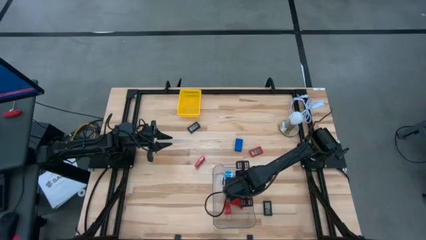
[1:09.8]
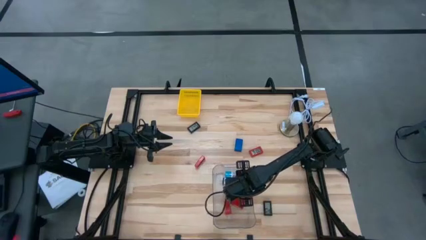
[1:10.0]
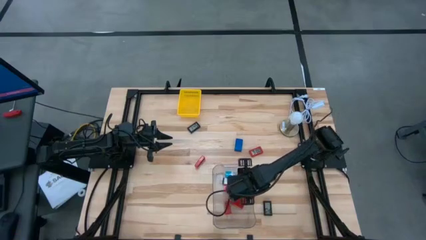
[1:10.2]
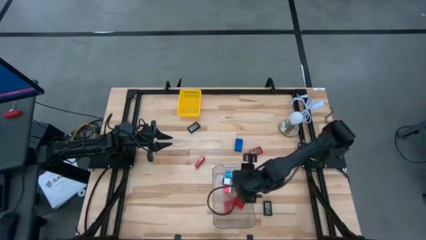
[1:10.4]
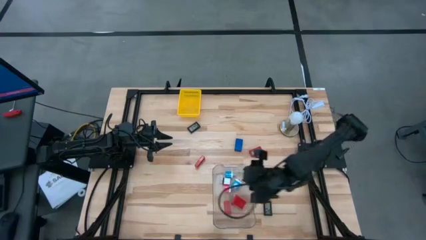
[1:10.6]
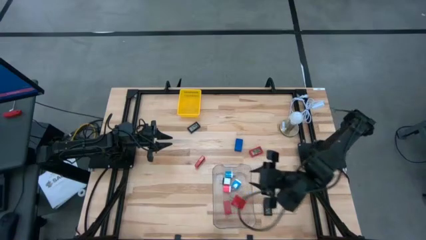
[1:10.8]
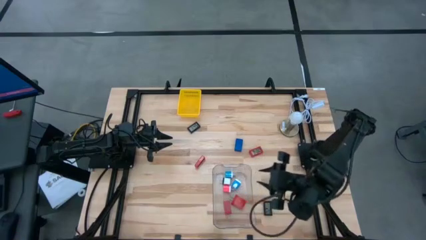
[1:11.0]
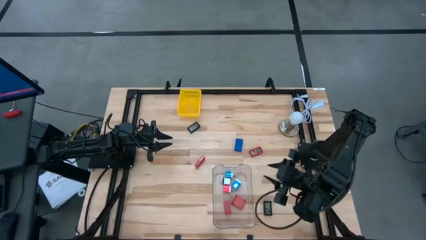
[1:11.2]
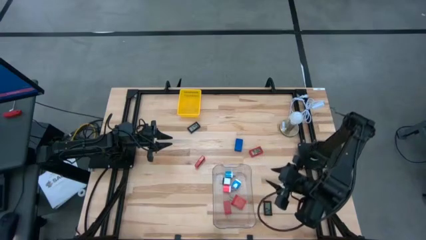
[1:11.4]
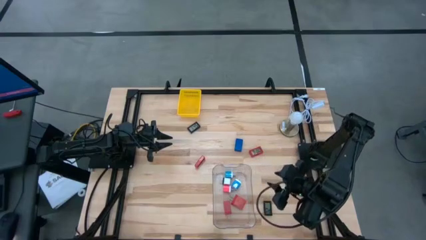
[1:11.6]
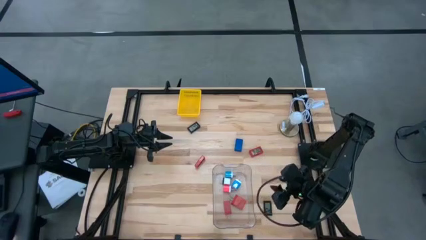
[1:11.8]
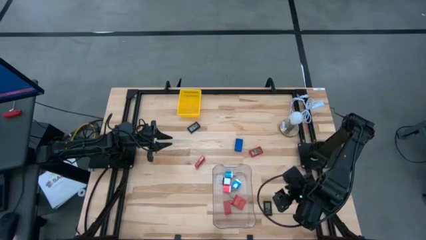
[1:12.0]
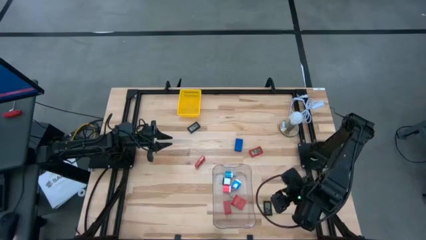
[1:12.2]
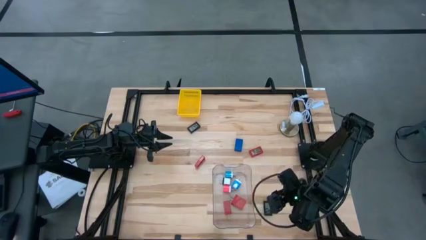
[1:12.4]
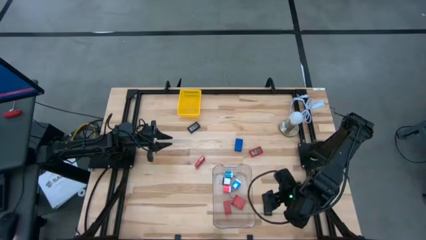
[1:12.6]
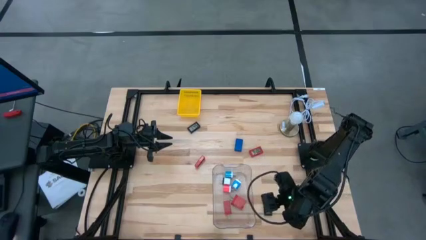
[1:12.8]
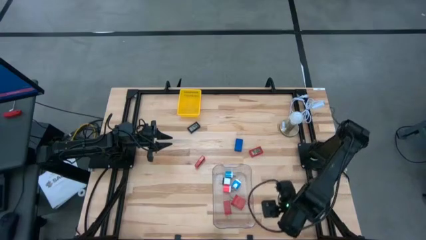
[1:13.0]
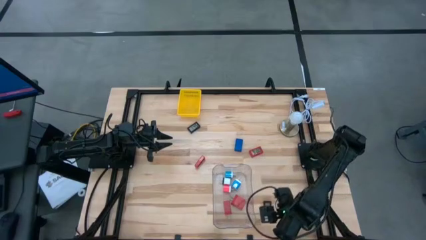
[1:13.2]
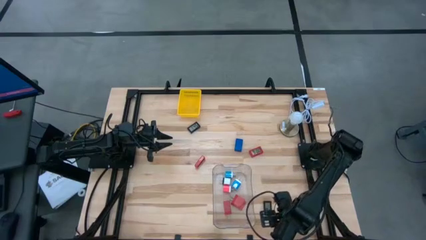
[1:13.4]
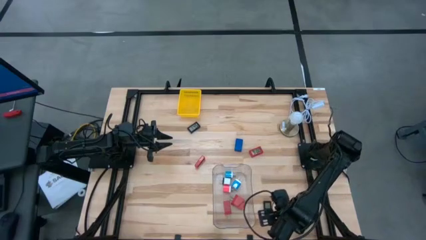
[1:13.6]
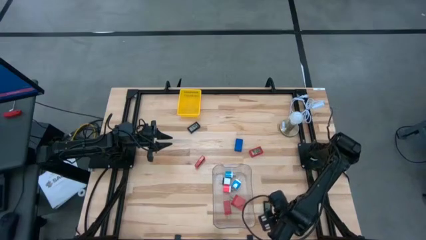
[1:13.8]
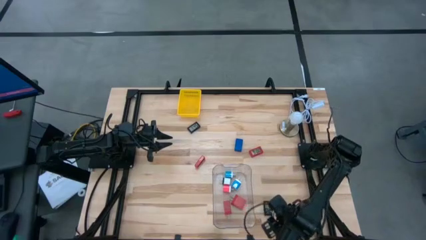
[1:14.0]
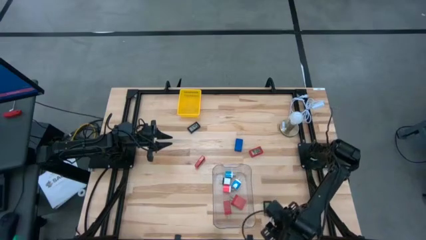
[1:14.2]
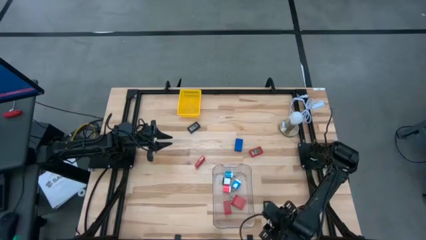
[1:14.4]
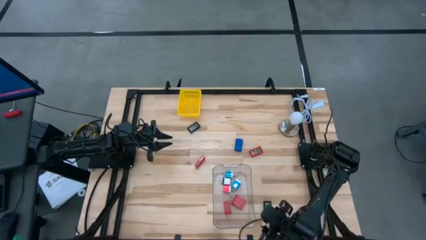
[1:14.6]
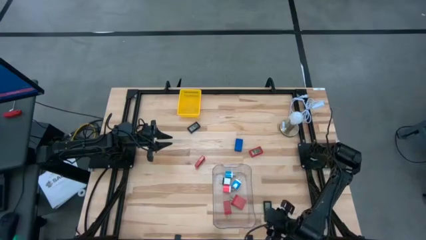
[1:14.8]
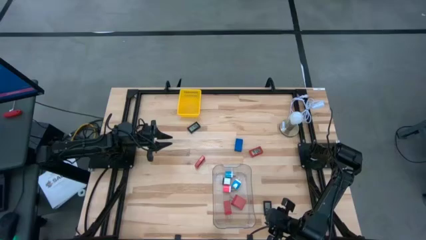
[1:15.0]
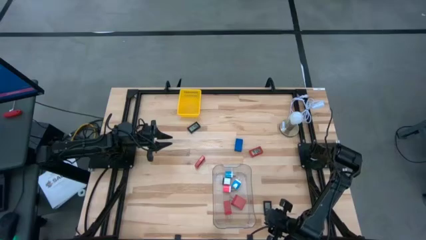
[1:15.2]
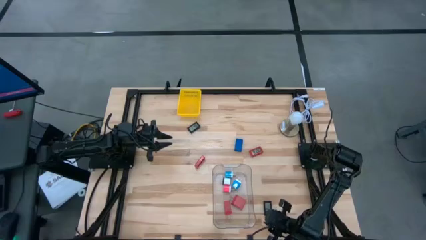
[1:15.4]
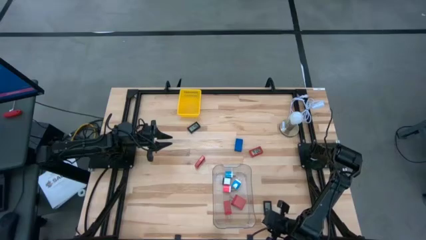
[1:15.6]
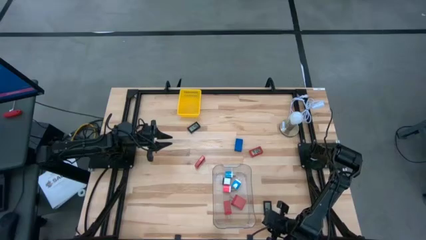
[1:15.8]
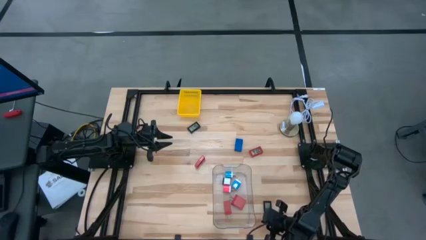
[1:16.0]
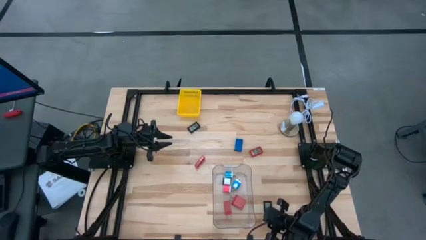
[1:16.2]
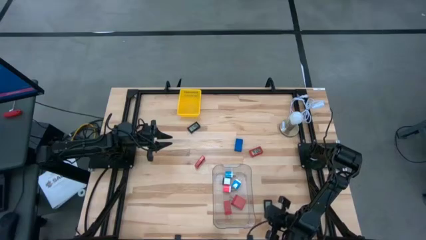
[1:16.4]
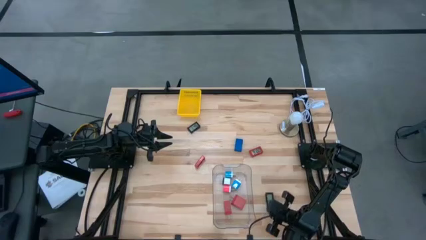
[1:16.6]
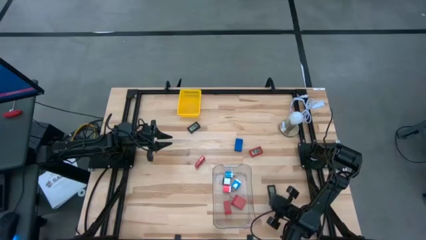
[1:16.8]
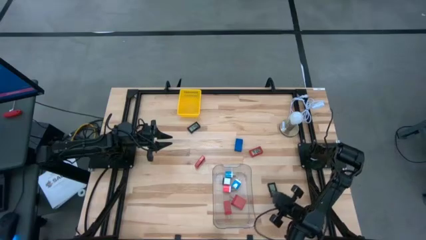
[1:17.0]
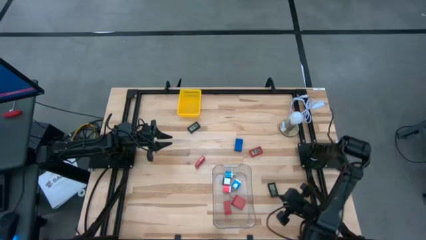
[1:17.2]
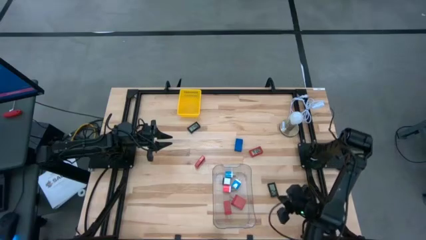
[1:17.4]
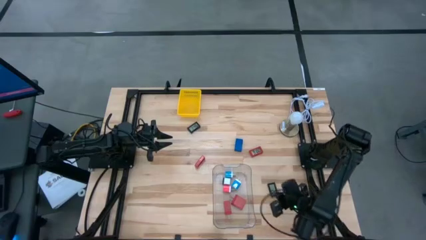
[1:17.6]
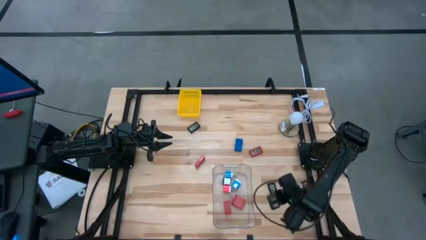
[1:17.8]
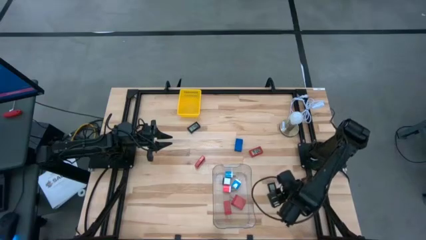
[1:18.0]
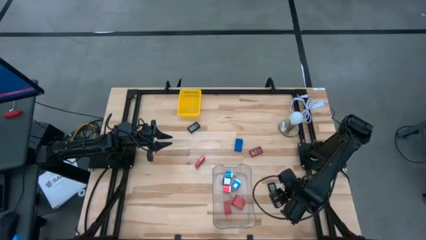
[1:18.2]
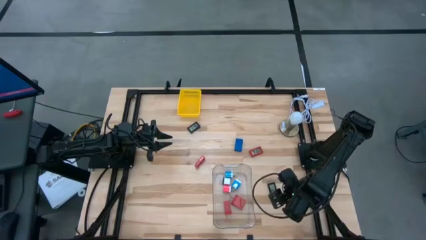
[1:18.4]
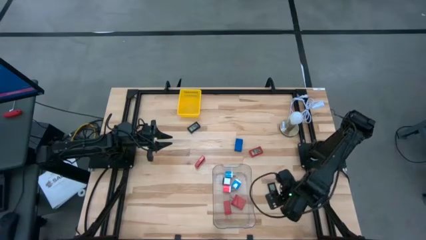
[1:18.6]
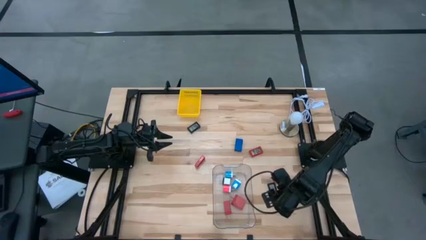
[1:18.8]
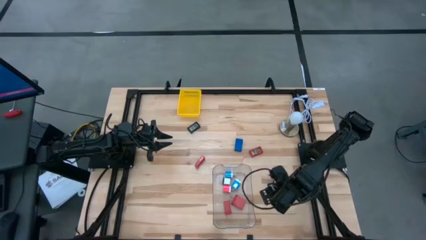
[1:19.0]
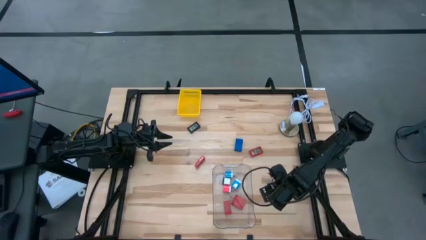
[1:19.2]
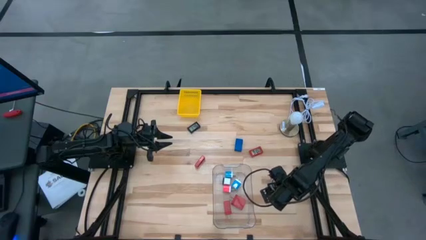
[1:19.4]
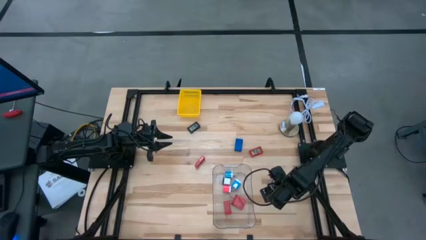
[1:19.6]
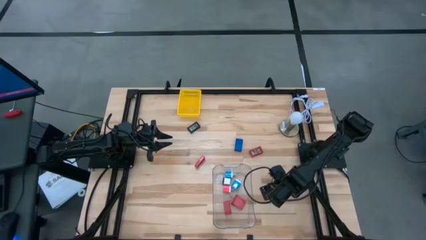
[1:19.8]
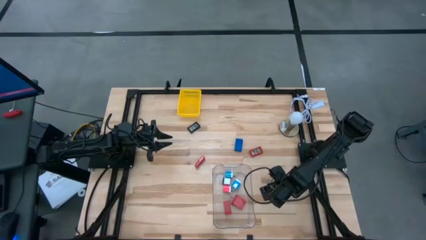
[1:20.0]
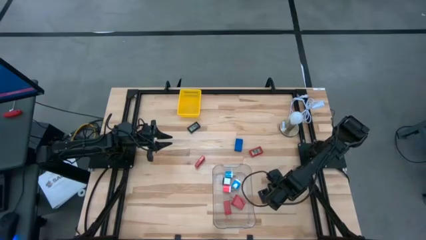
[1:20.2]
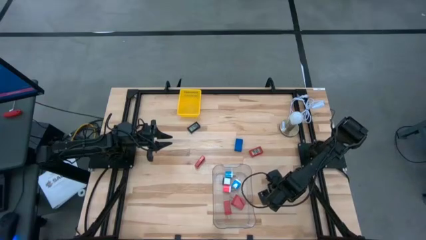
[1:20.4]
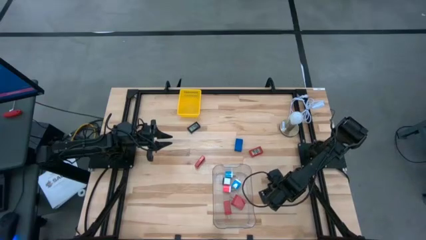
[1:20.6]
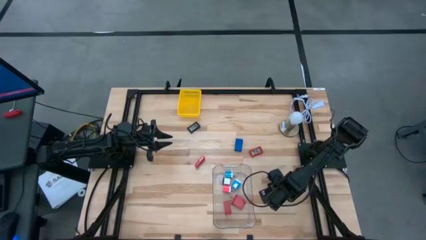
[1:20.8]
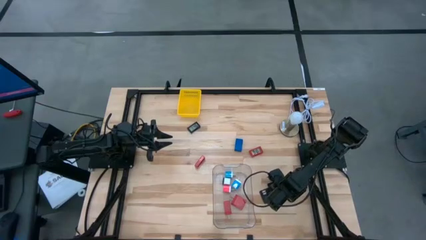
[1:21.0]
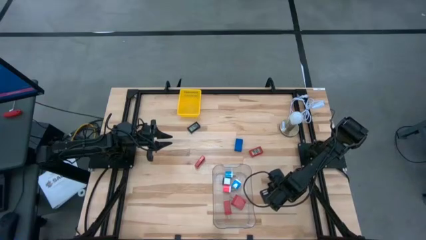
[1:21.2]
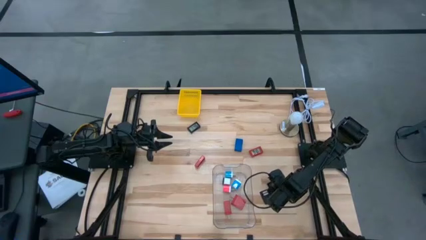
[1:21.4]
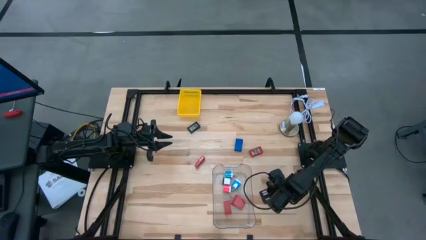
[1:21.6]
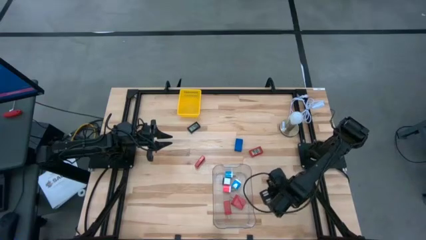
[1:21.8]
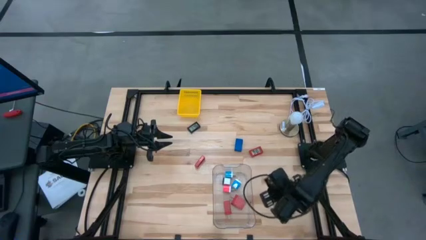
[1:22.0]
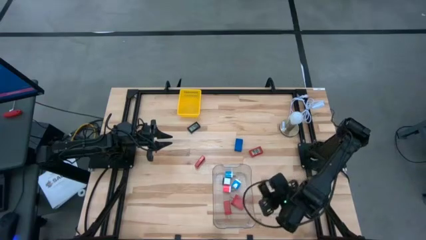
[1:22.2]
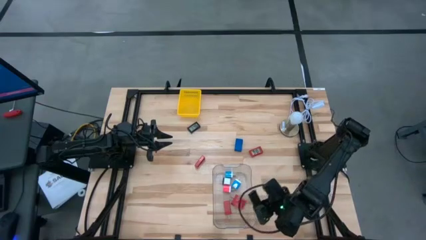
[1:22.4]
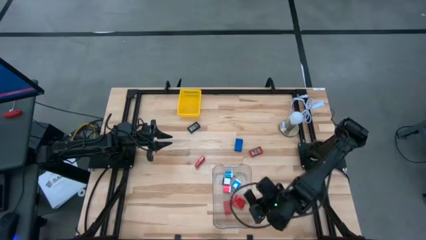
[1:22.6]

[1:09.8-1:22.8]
Task: Pick & Place Office items
Put the right black digital clock into the yellow bin
